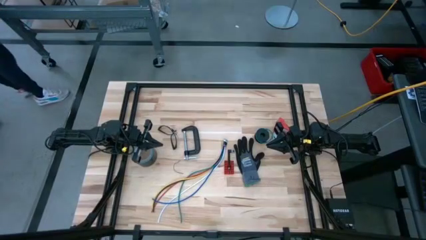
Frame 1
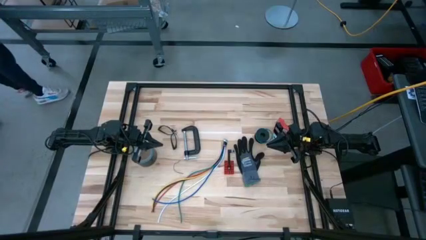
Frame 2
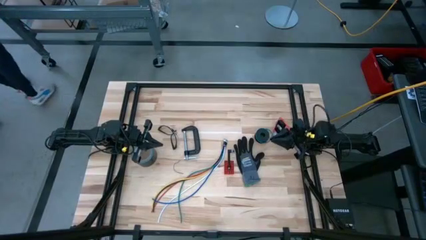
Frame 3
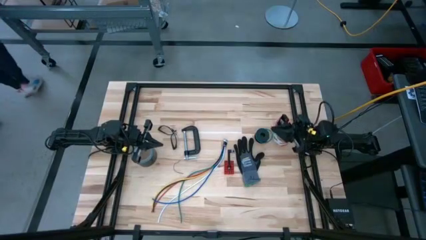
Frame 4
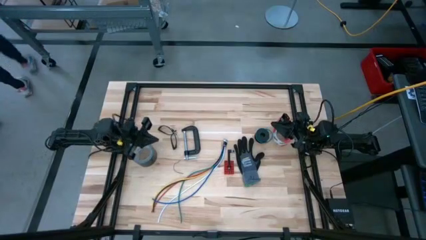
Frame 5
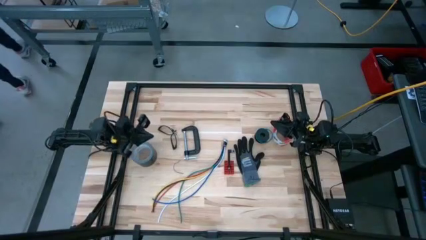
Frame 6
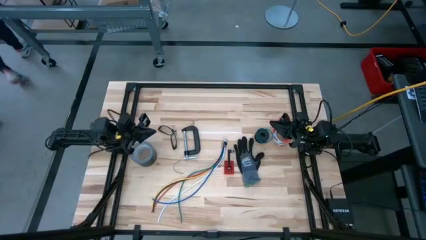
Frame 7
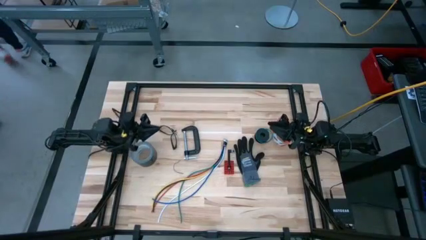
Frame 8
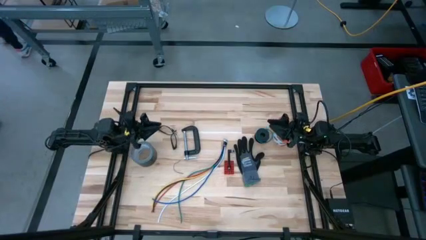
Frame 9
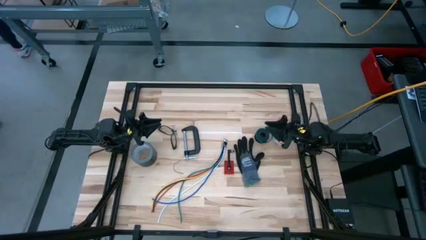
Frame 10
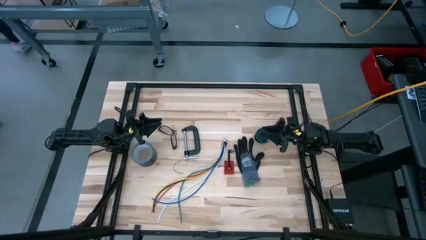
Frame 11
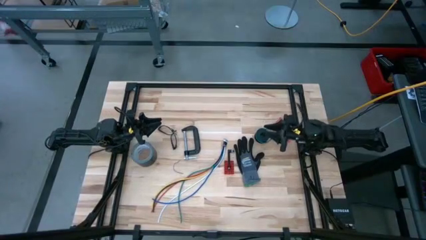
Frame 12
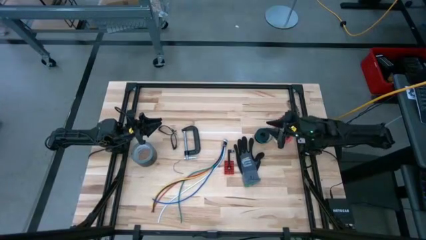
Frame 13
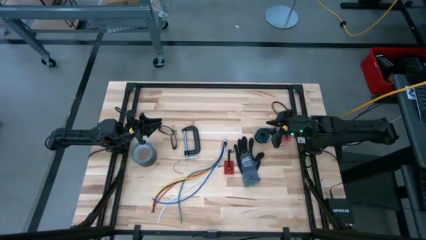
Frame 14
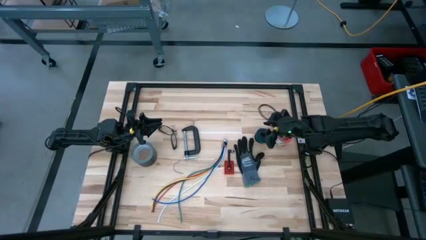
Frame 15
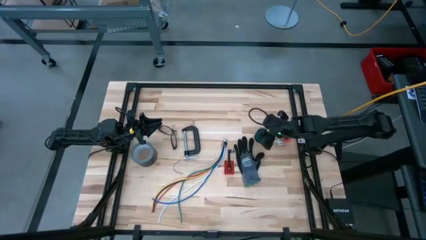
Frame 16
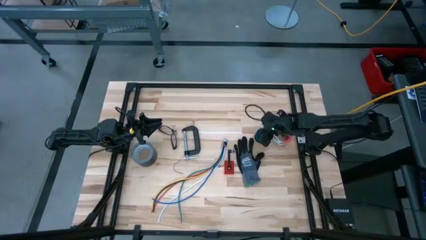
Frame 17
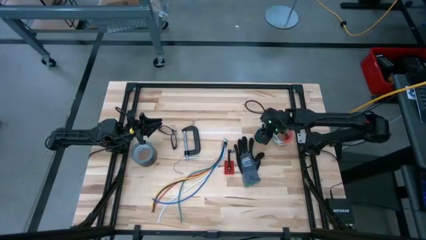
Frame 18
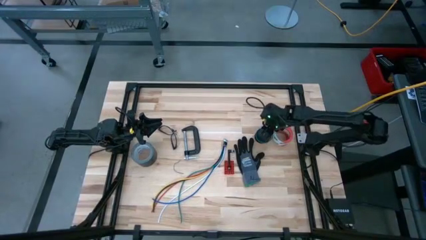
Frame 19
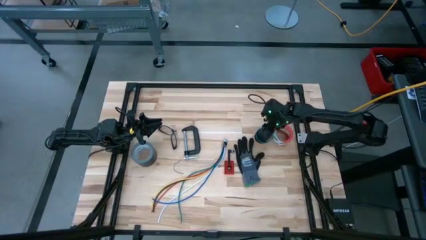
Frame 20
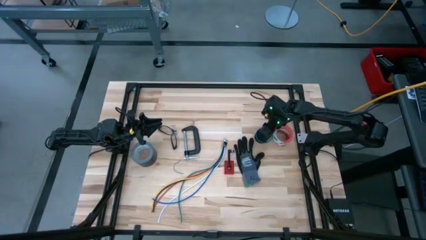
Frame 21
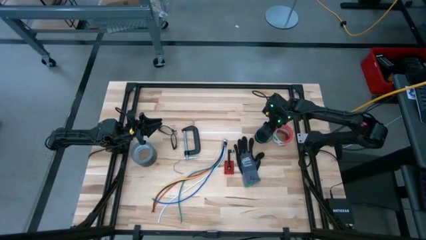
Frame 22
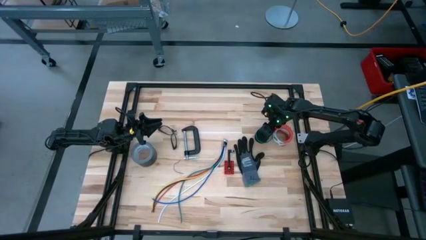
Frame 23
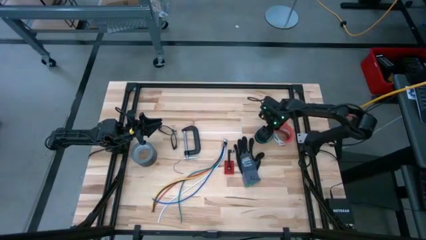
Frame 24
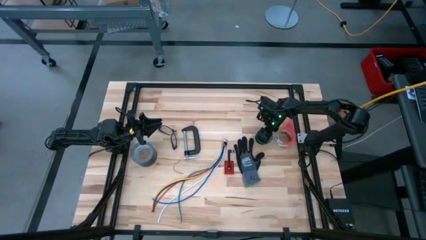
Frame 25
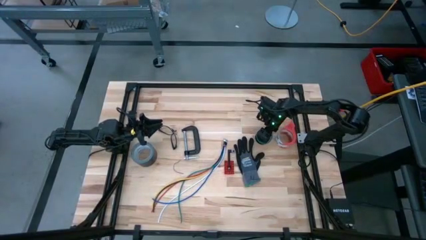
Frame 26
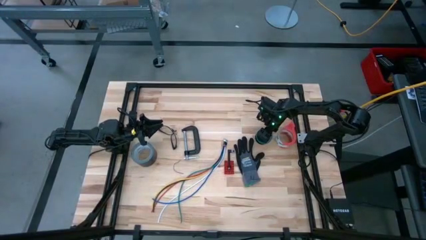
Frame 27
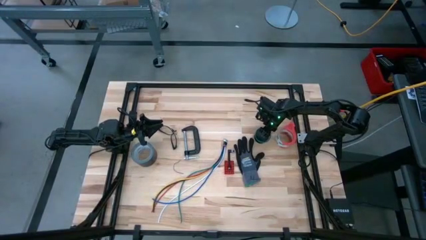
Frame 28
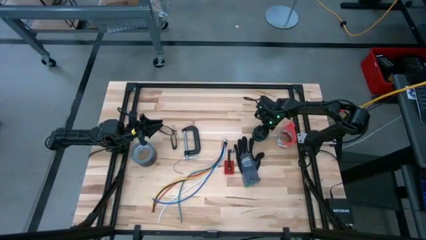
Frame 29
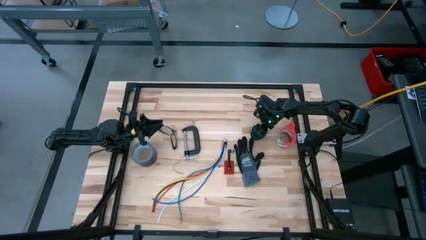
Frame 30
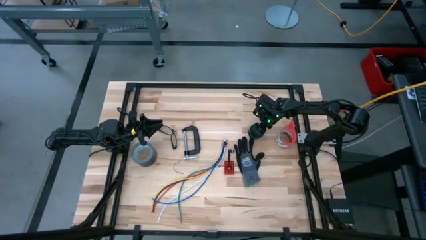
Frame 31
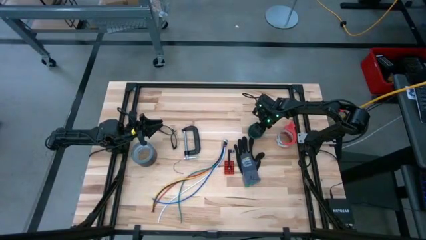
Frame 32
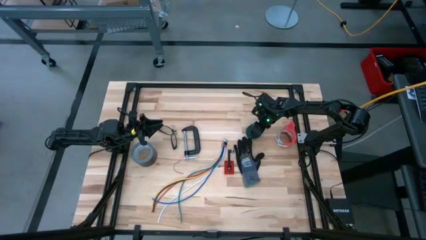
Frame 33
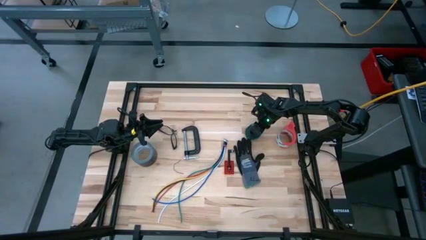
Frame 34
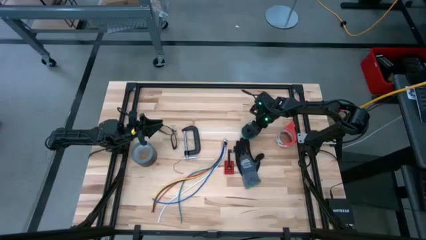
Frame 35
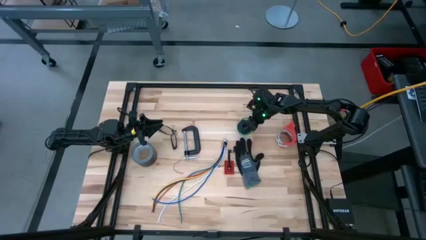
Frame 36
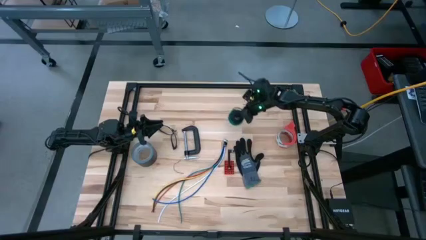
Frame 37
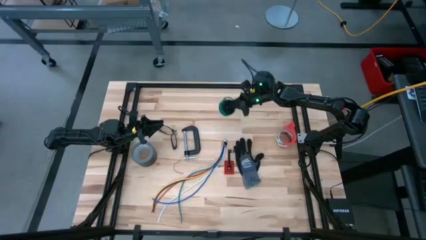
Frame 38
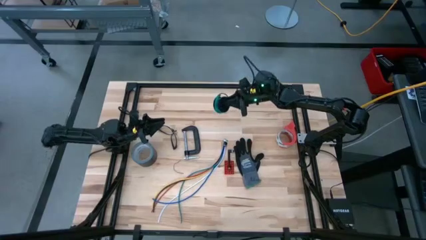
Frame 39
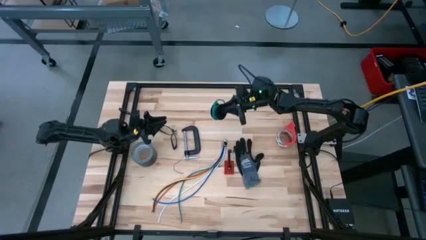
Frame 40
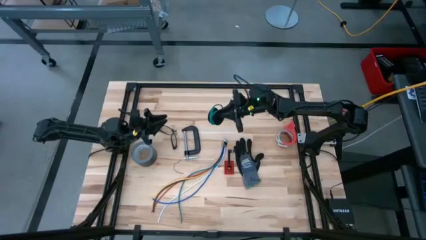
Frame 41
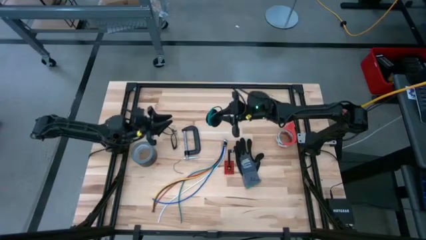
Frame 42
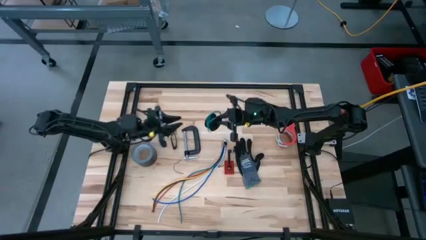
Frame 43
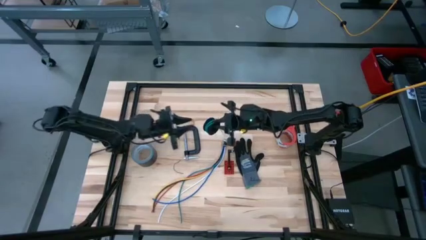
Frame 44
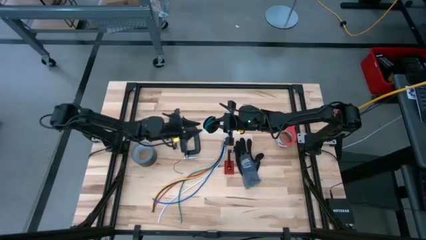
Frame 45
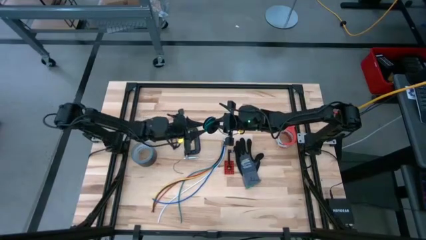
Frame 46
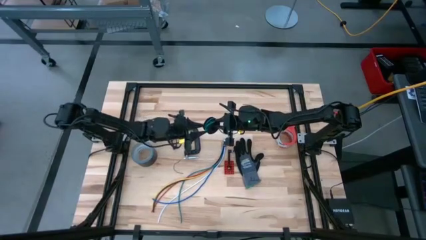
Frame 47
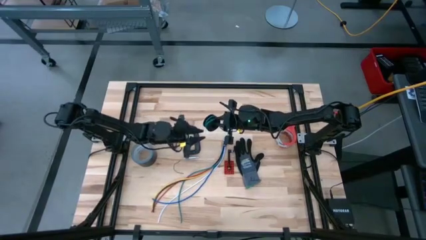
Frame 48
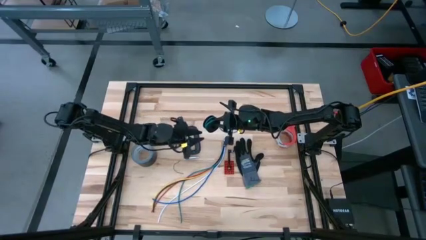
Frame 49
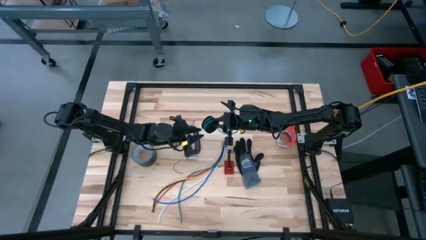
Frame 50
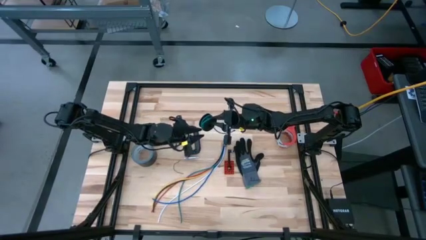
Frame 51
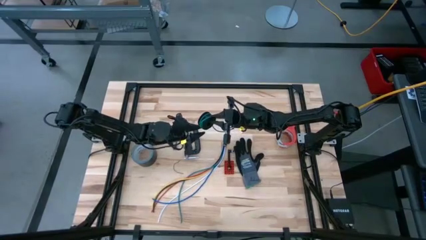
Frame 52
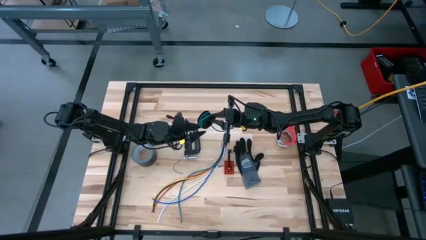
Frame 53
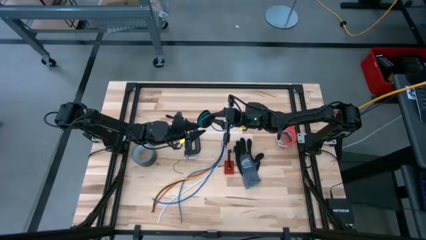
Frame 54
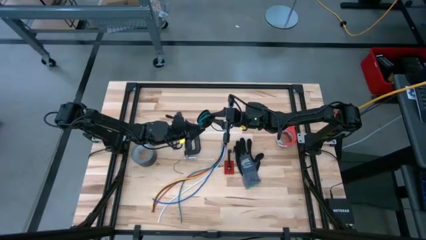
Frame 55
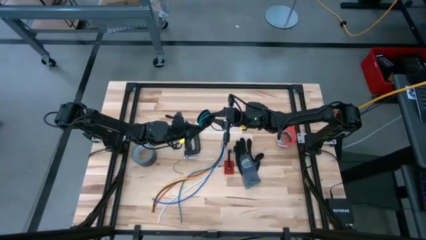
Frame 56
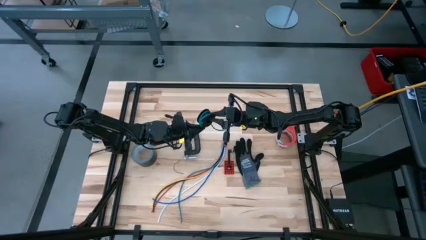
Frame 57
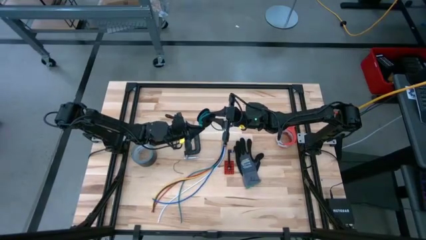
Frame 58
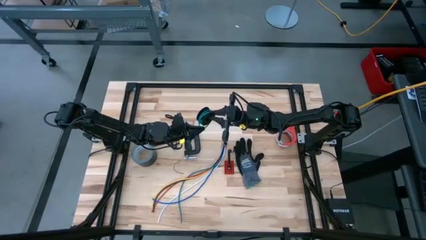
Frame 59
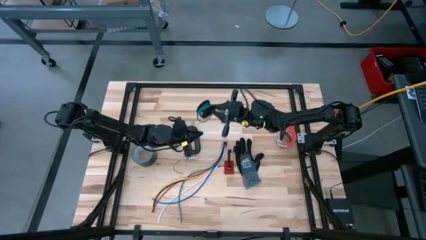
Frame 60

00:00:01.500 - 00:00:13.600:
Task: Coil cords
Uncoil the green wire from the spool
